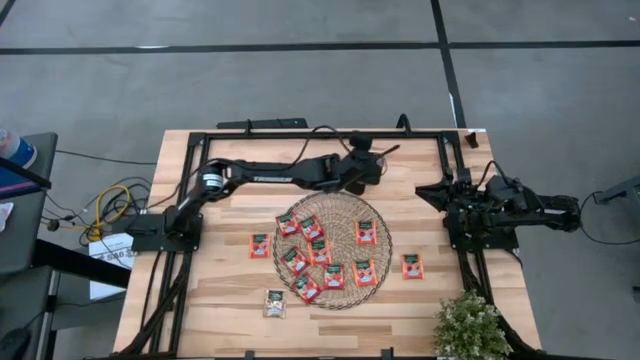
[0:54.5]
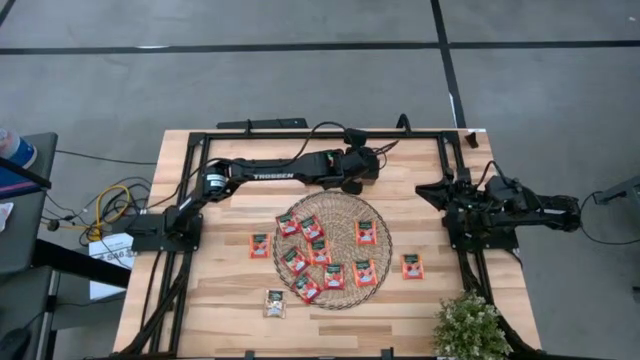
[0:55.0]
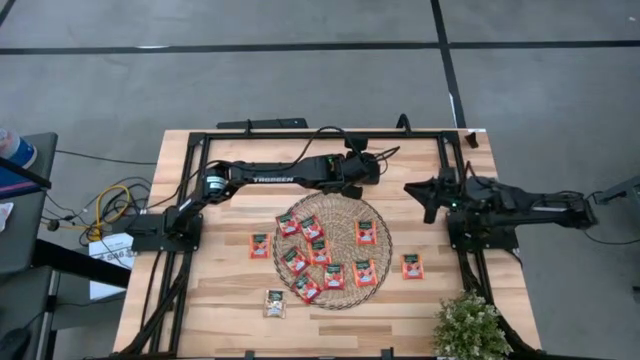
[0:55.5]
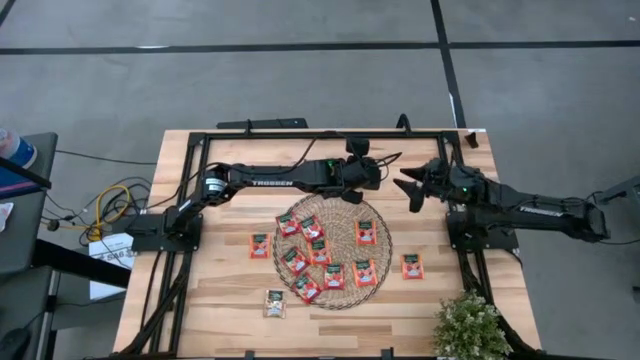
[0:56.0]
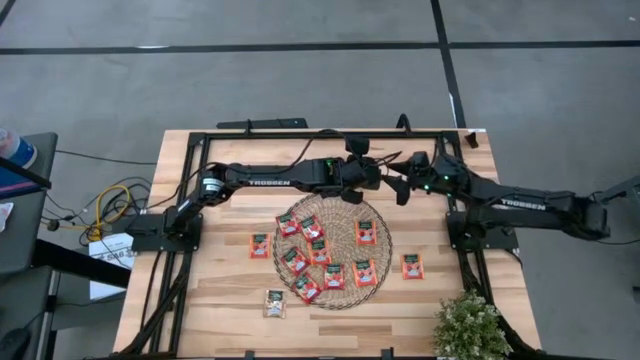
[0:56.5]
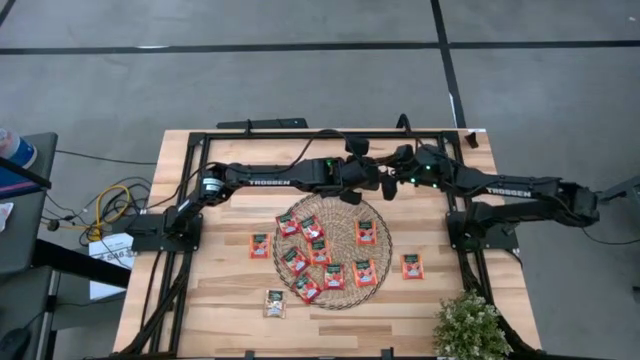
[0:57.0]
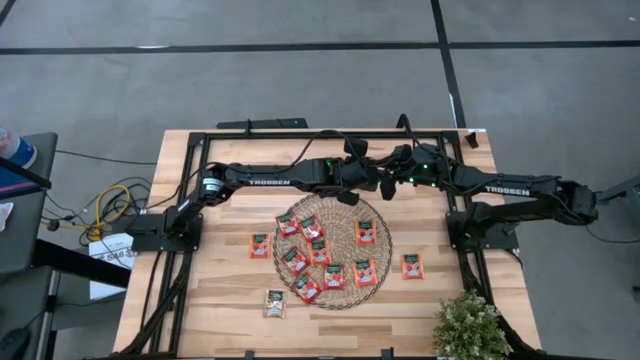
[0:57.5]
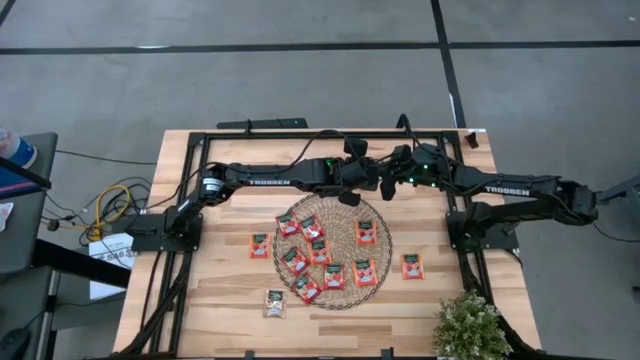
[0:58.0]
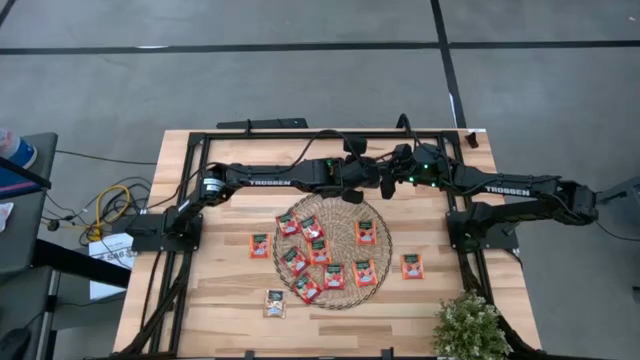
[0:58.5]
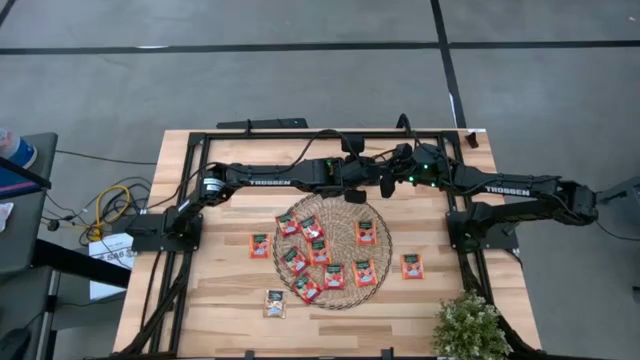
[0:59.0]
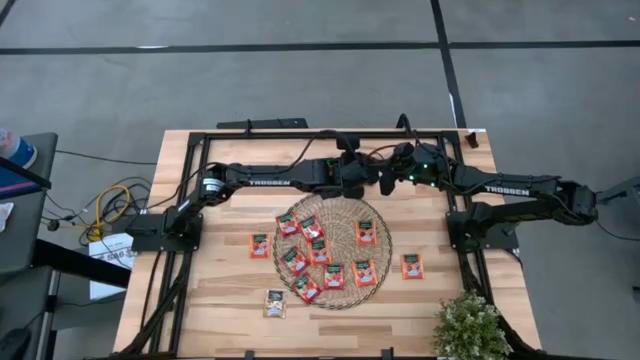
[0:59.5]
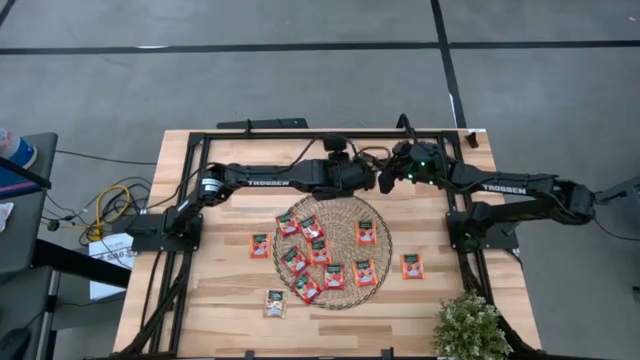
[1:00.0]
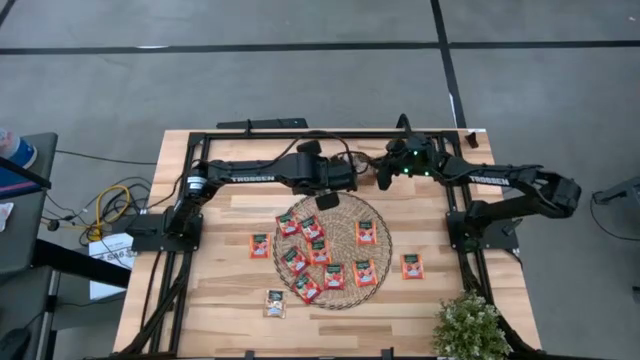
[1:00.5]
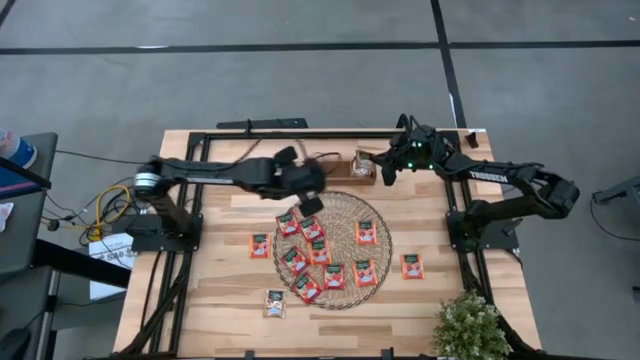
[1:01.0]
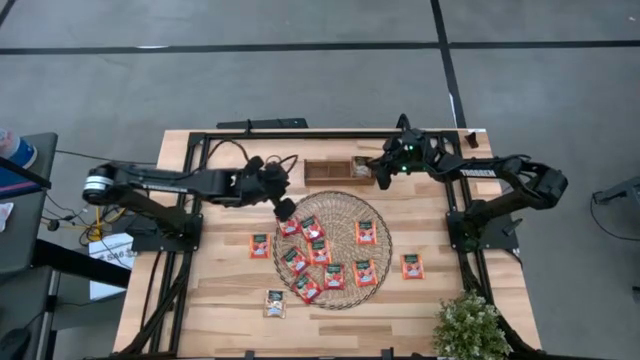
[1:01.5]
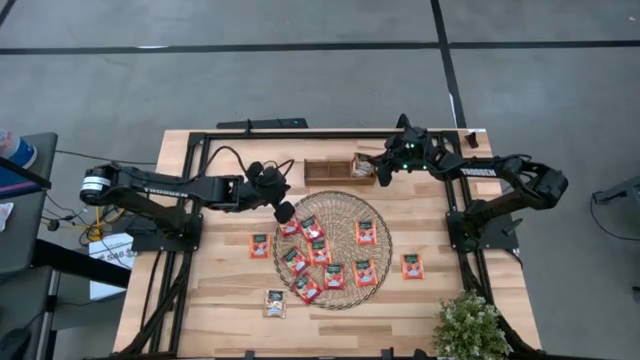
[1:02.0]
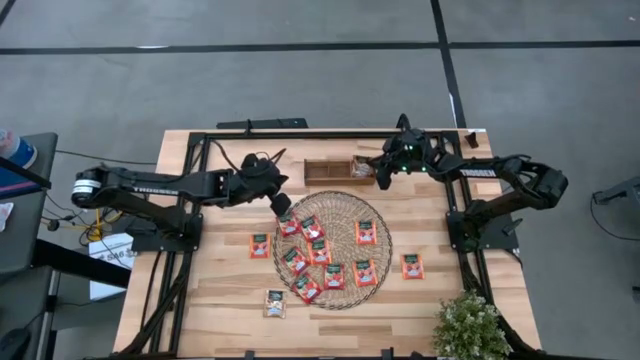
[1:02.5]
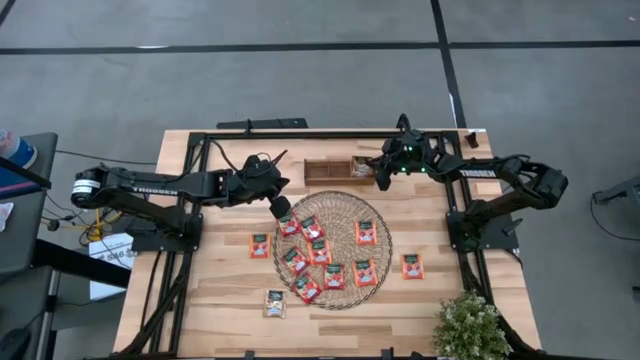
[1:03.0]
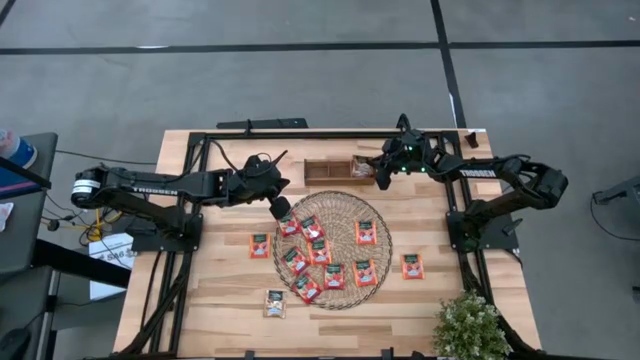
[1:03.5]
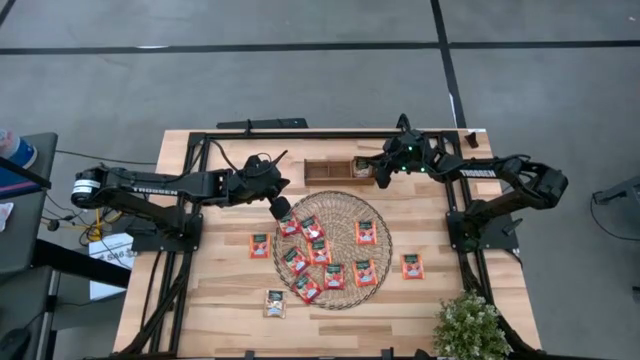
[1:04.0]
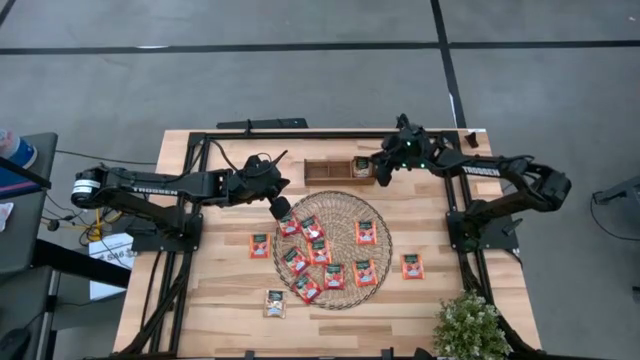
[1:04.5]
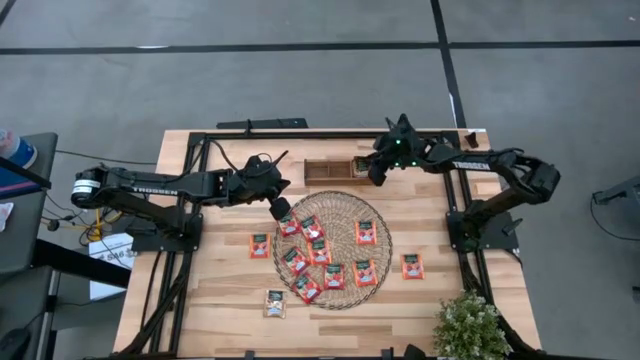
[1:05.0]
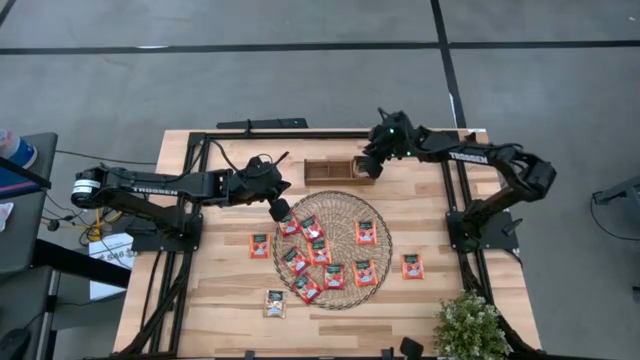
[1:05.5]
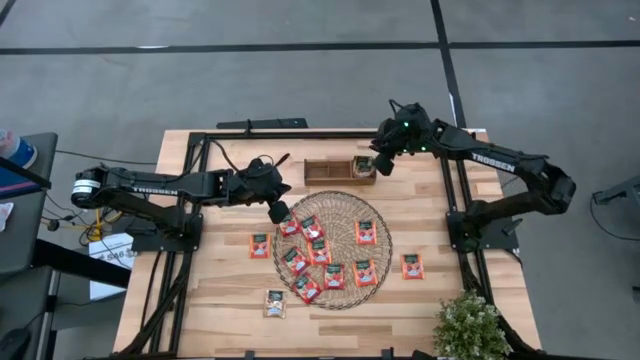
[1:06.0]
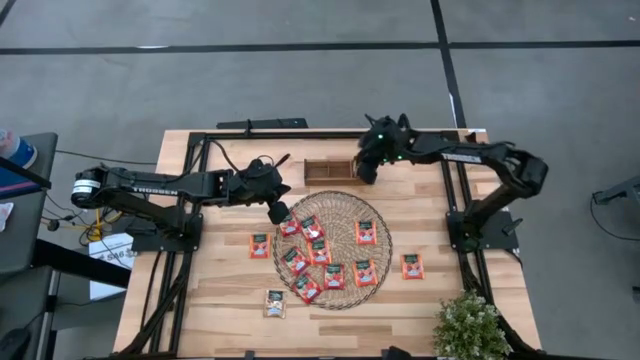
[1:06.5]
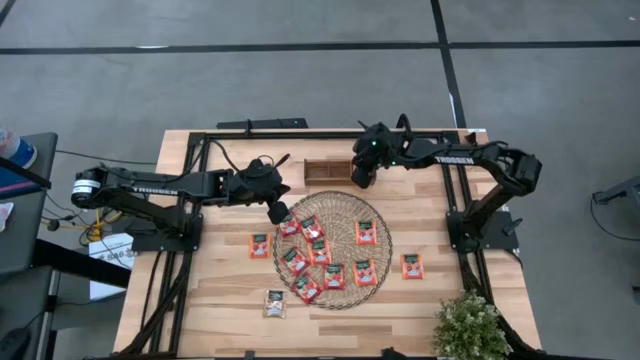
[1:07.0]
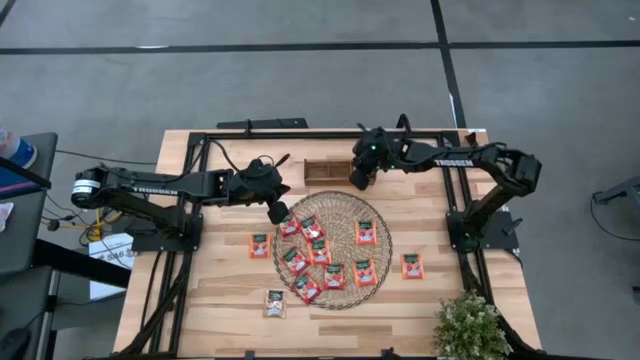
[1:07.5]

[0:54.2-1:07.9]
Task: Pick & Place Tea
Put the top brown tea bag into the right slot of the wooden organizer

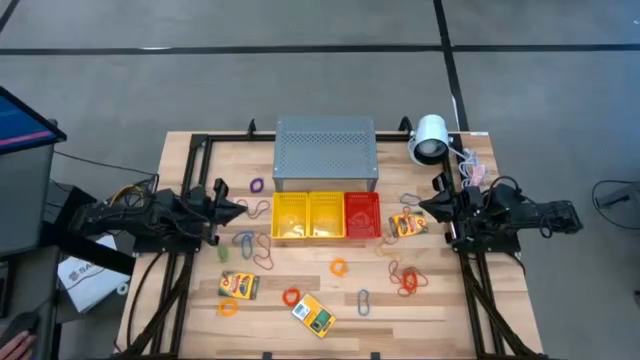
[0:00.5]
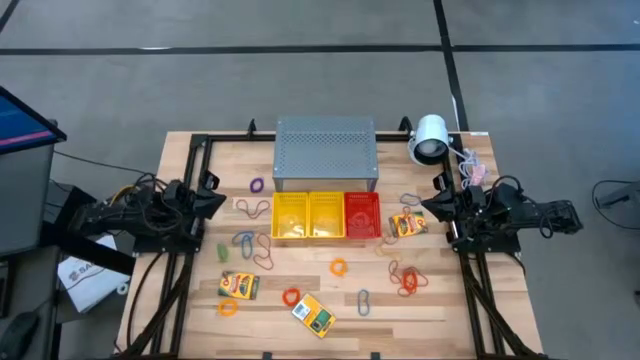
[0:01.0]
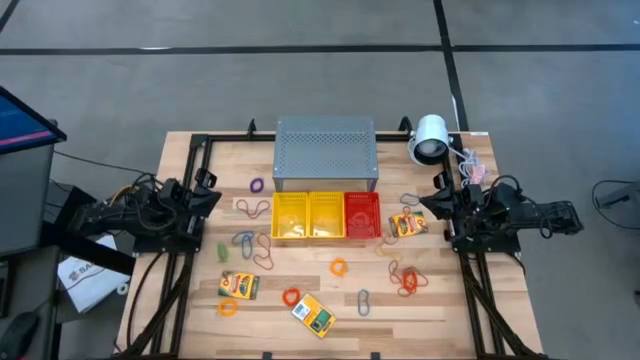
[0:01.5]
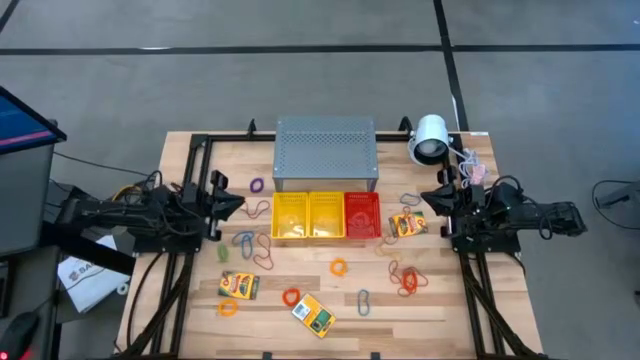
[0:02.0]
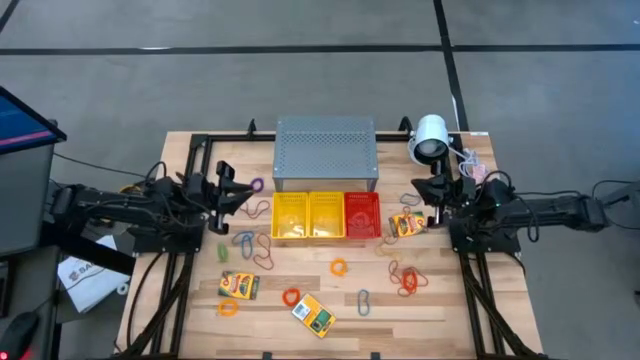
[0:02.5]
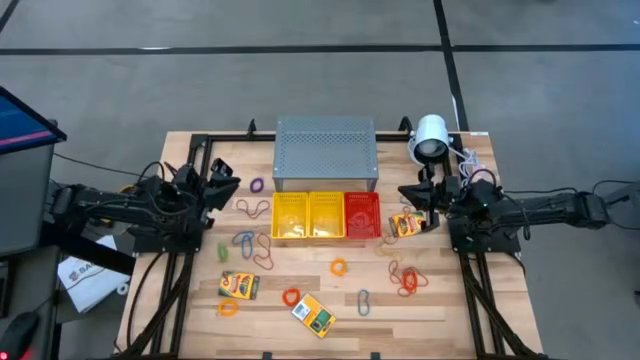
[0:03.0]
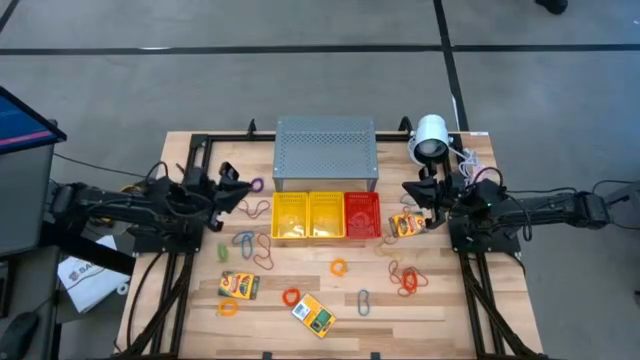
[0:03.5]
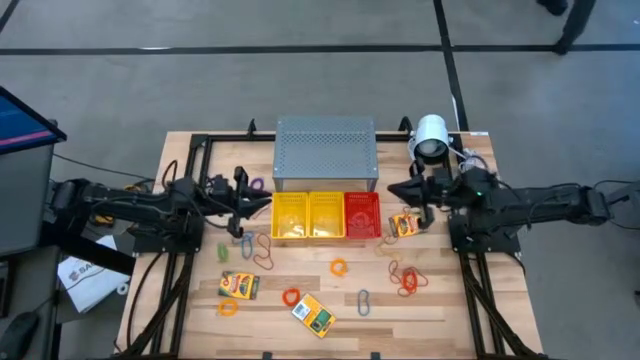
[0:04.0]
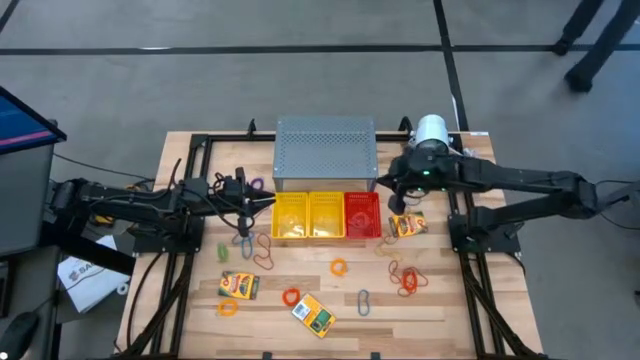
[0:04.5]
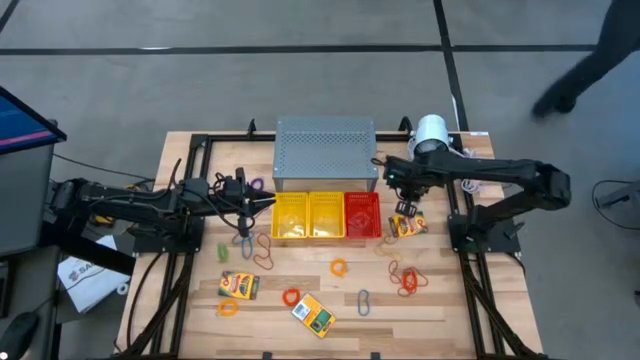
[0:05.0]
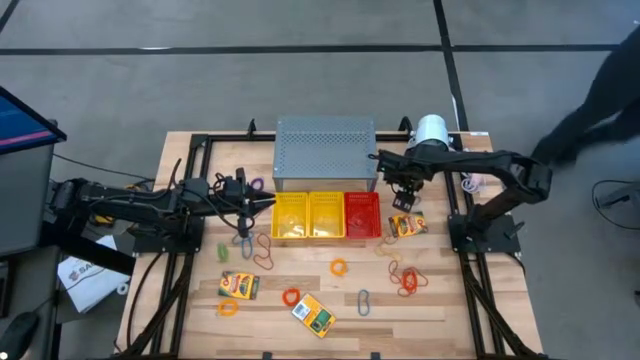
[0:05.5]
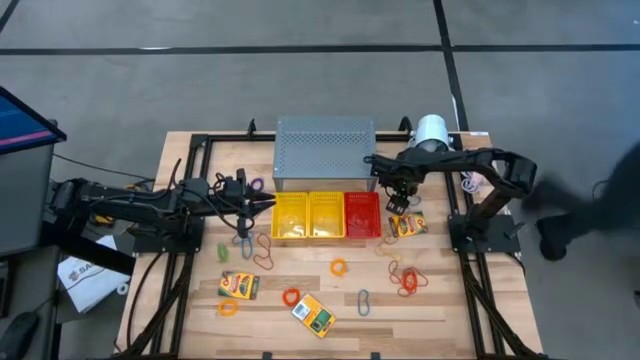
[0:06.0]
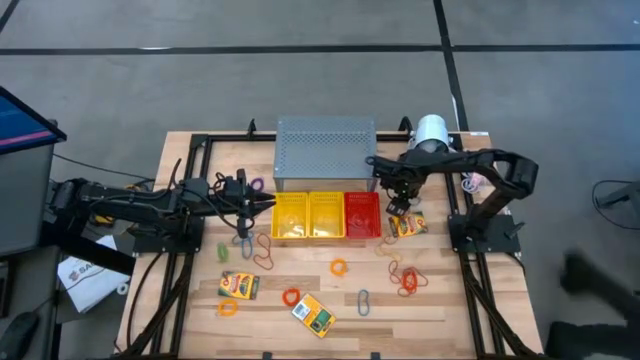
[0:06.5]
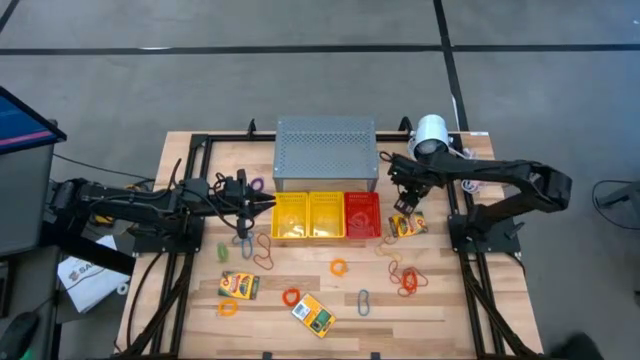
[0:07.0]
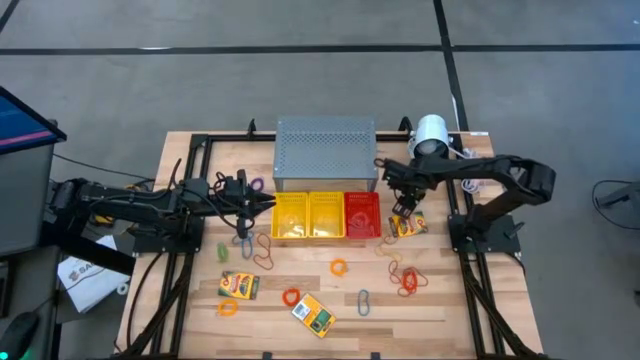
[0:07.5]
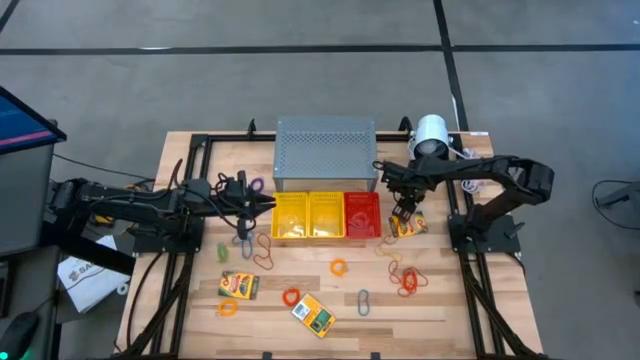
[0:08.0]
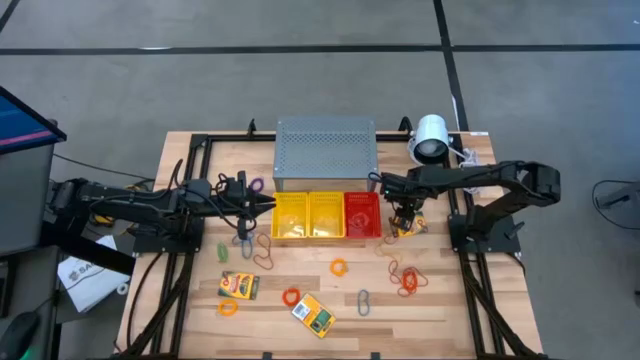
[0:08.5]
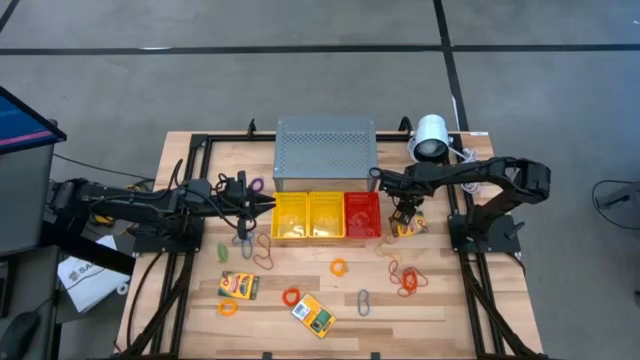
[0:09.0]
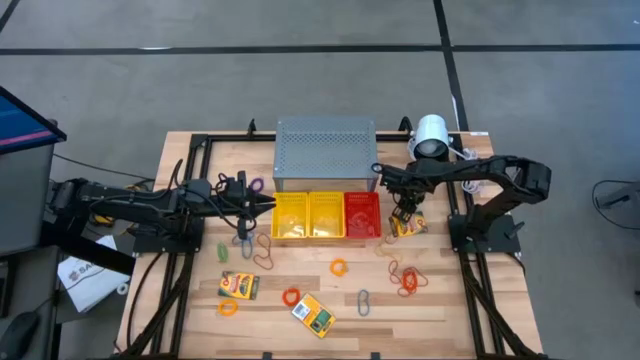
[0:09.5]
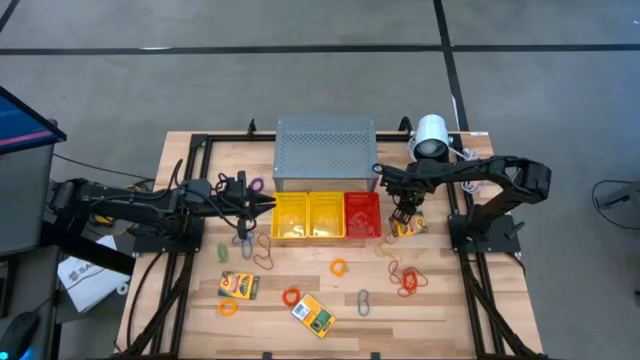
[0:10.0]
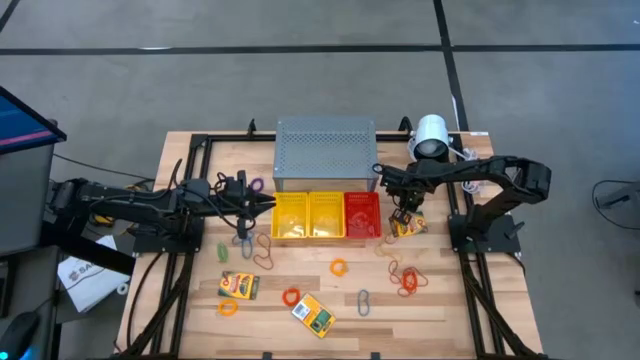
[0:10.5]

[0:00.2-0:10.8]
Task: Pick & Place Office Desk Supplies
Put the blue rubber band into the red bin
